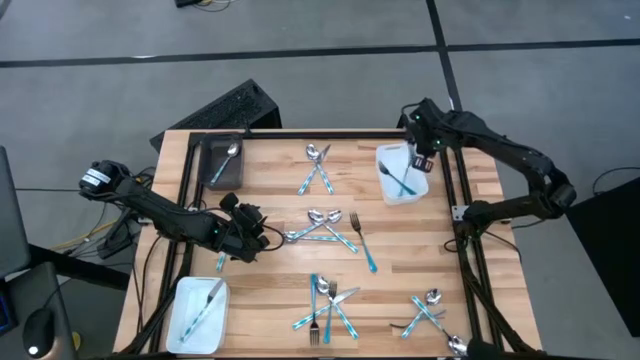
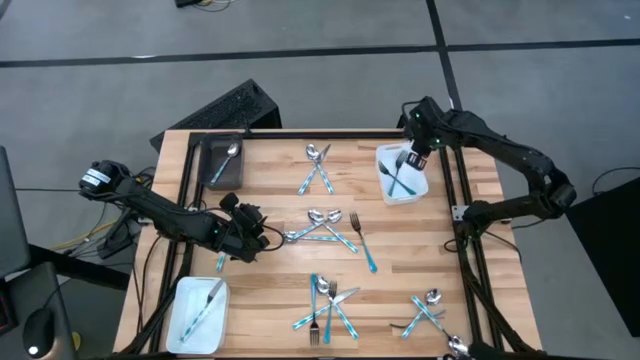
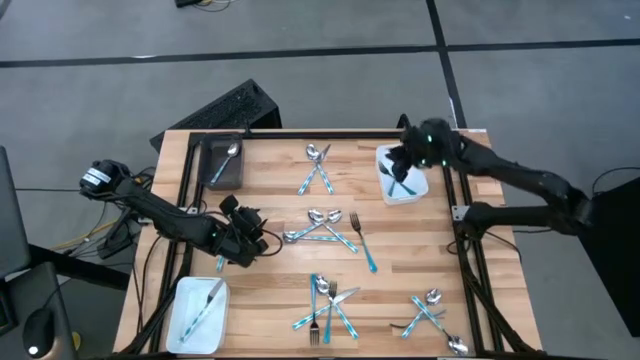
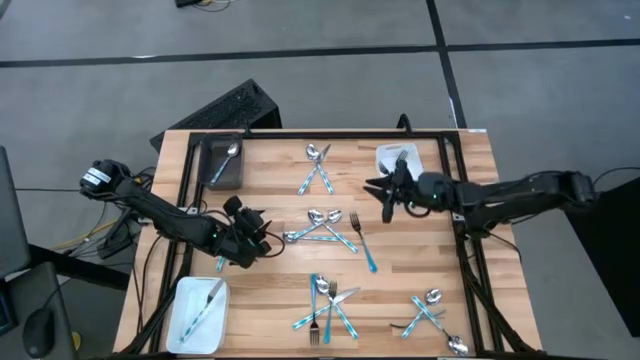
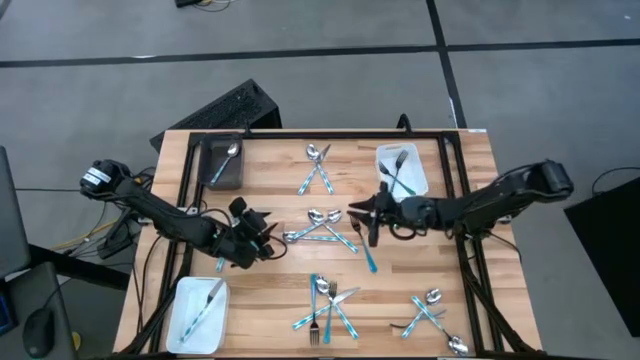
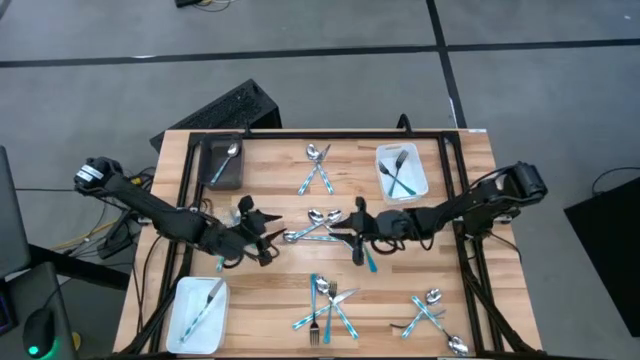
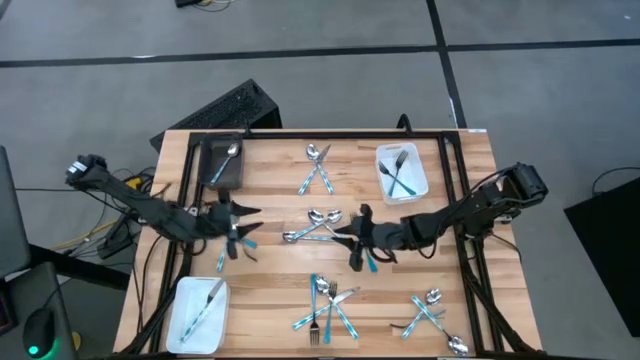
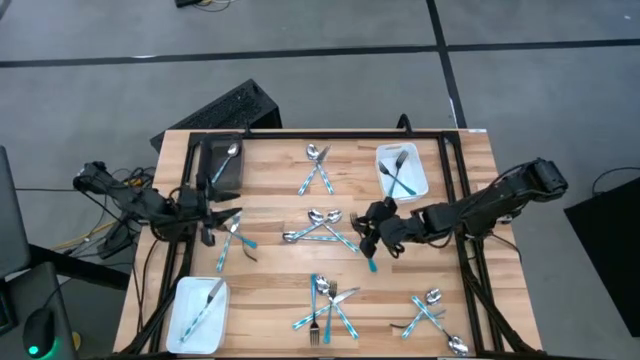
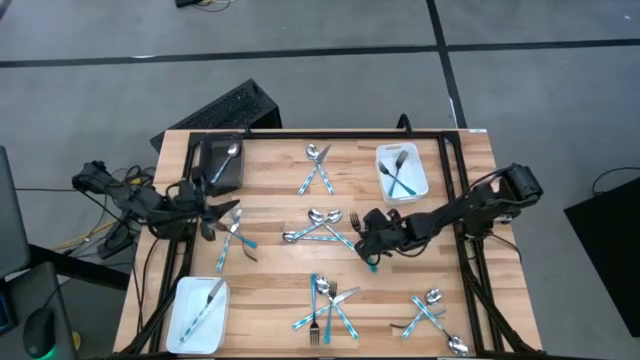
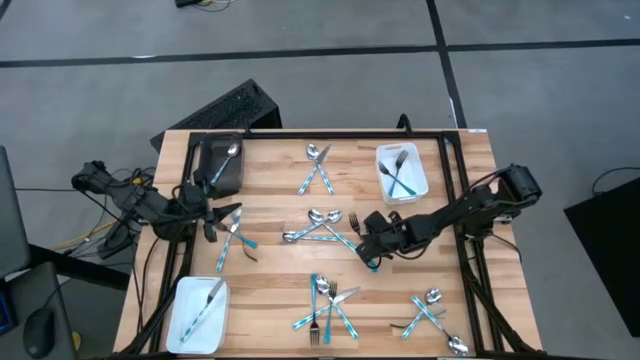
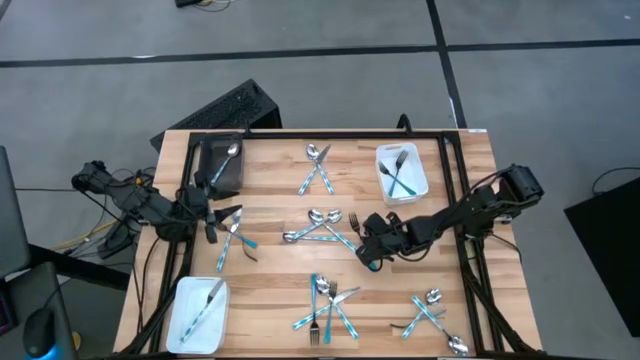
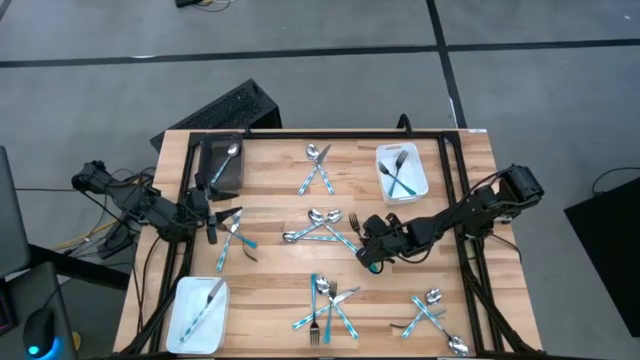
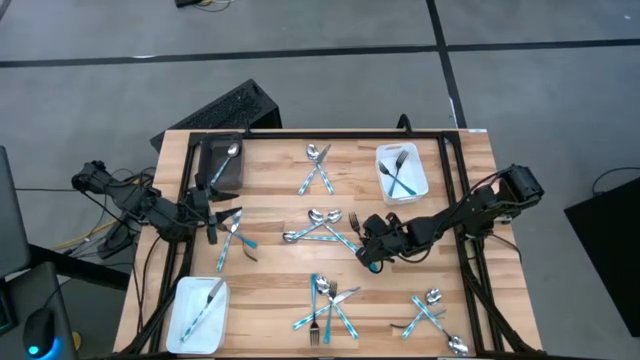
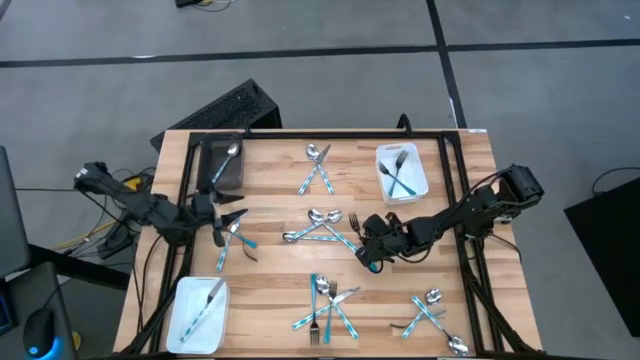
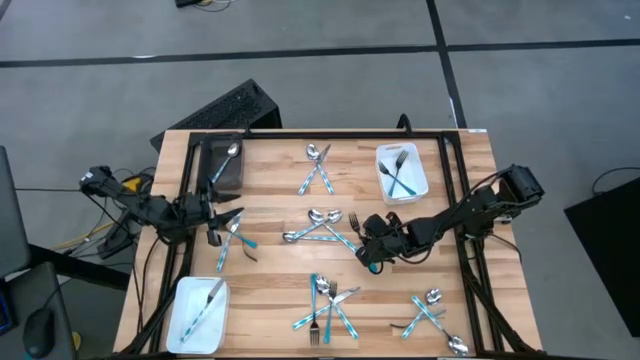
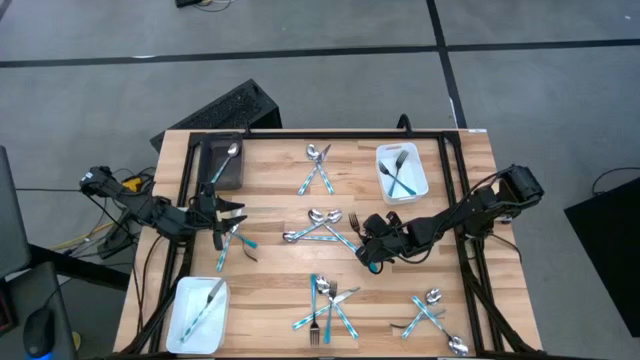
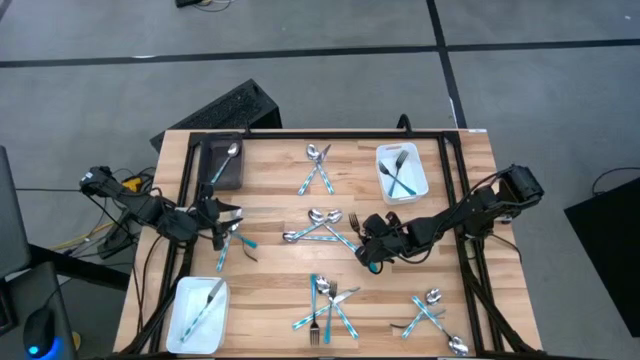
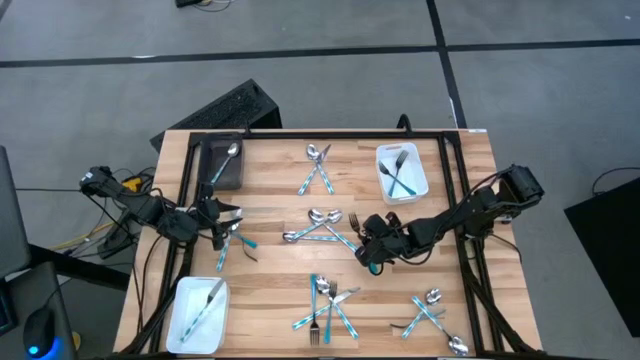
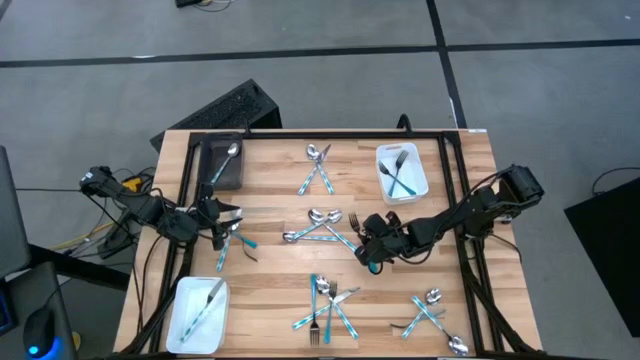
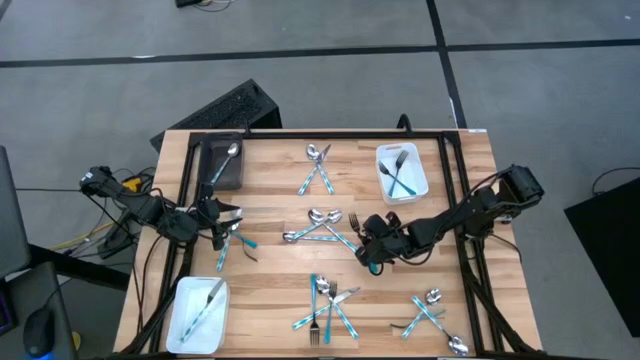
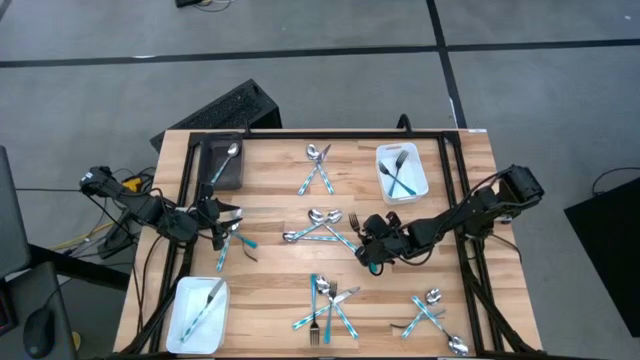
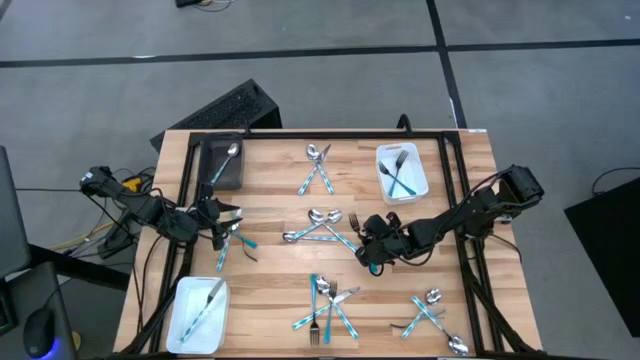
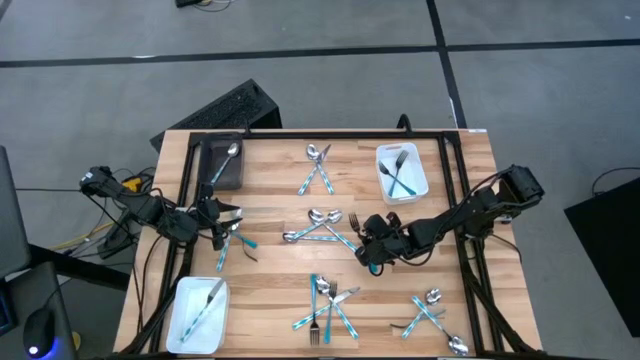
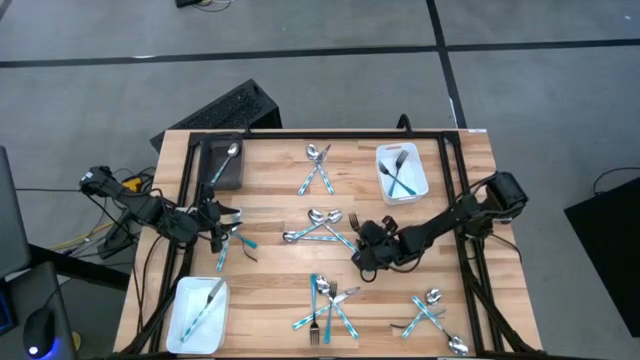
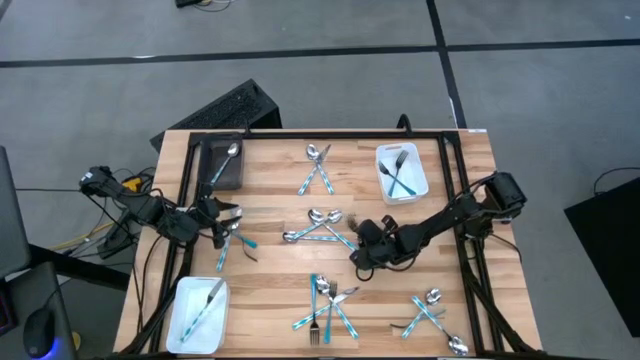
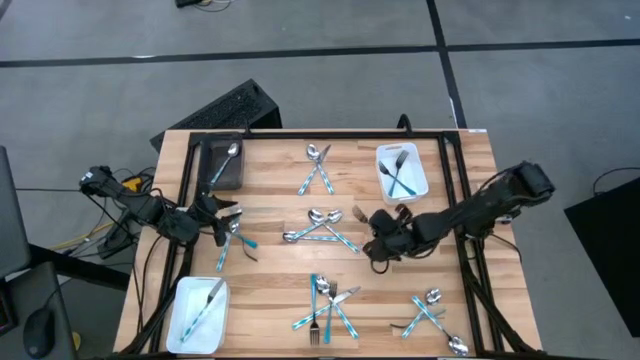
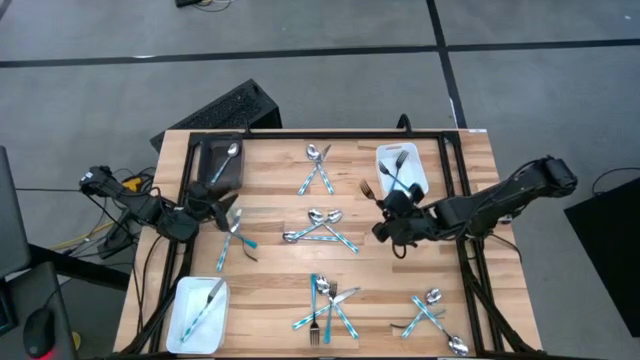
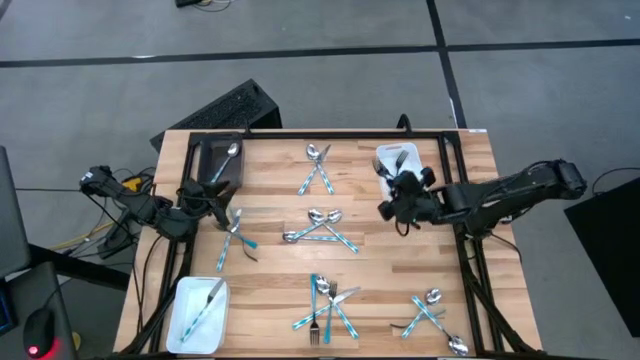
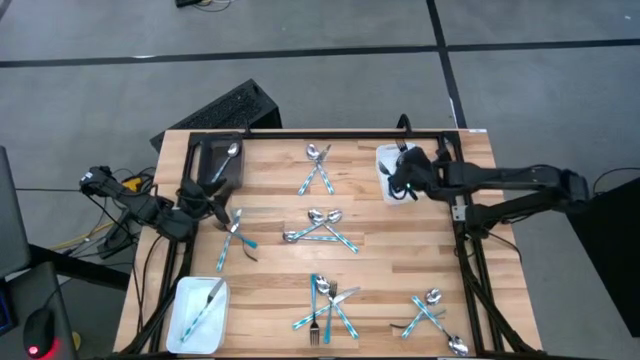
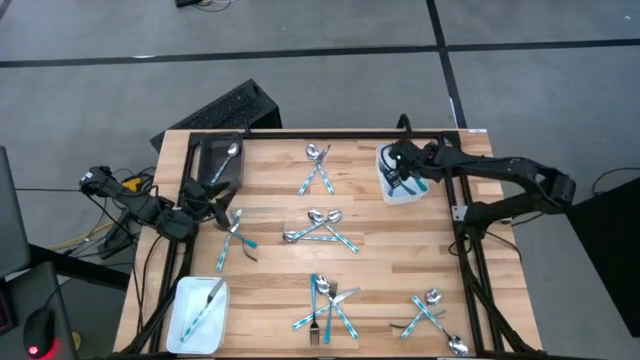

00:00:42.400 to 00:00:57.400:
Task: Sort silverware by color (type)
Put the blue fork into the top white bin

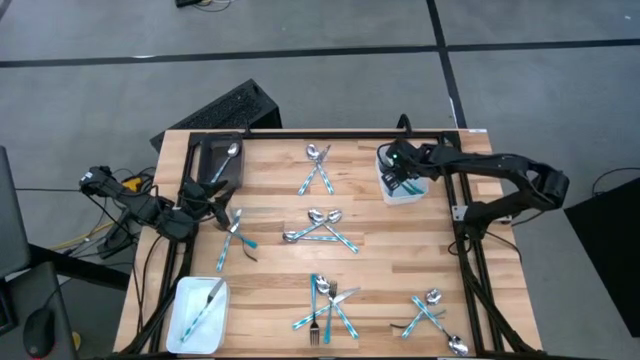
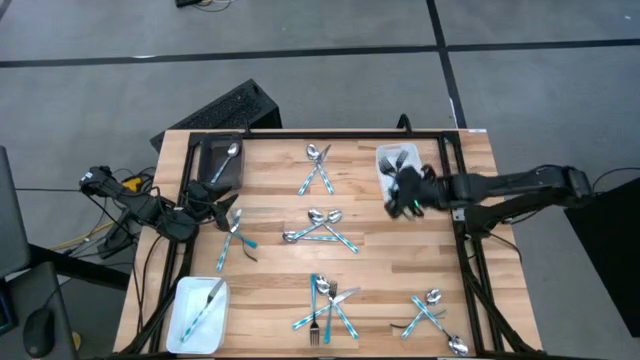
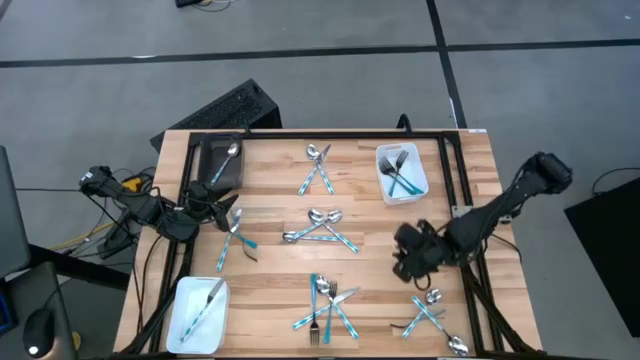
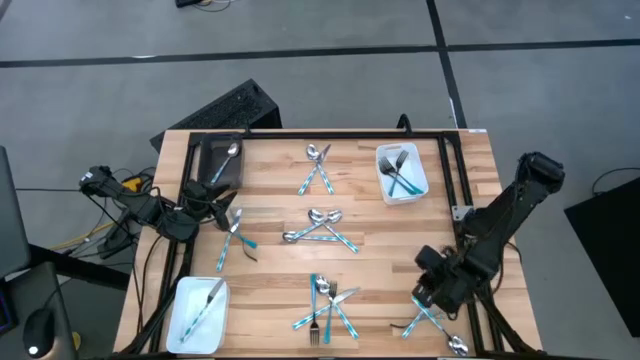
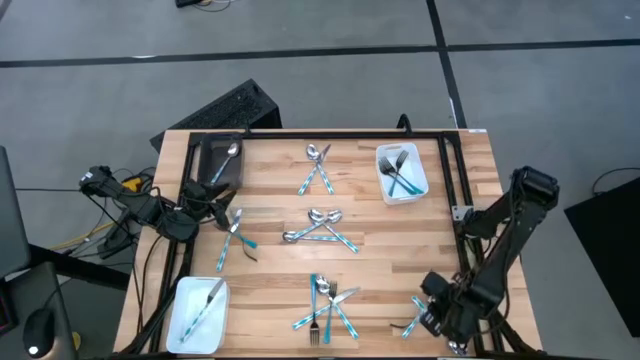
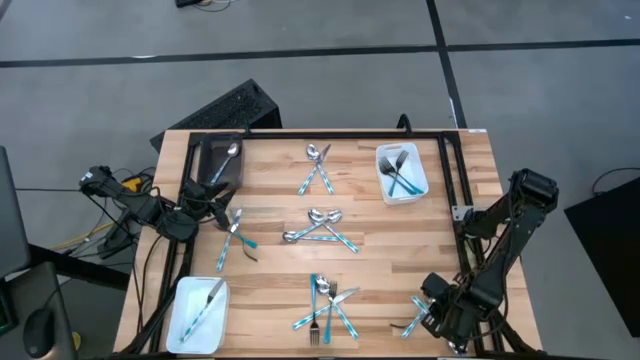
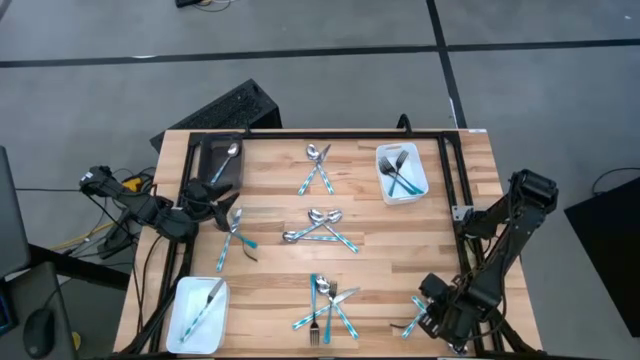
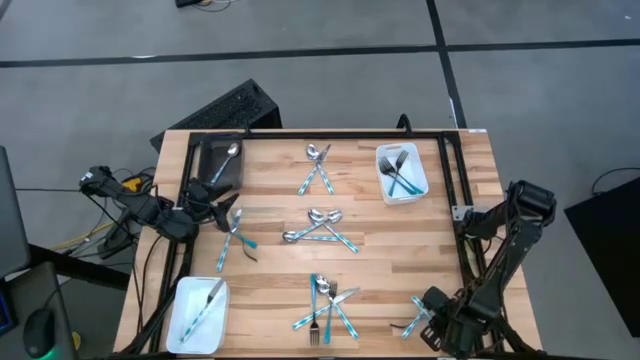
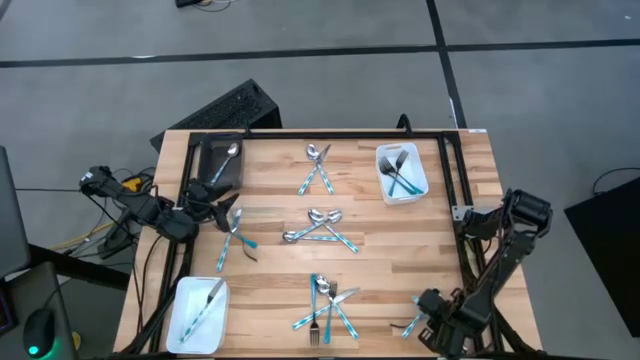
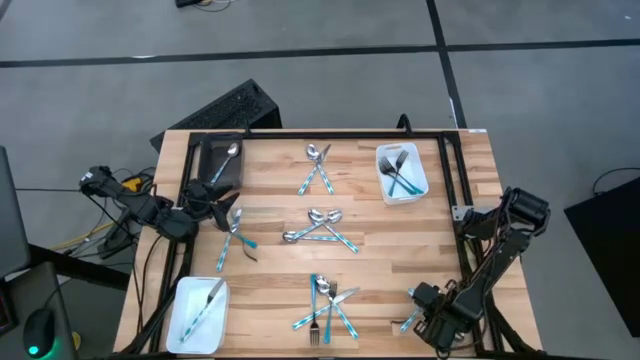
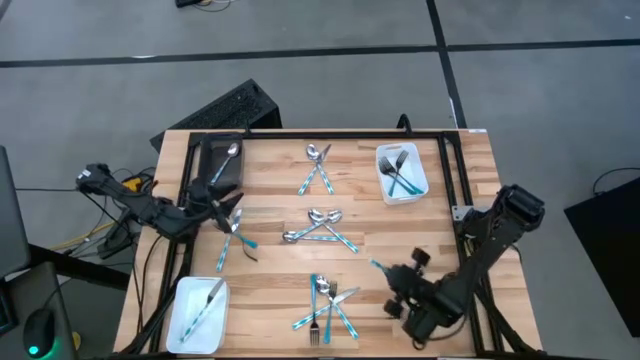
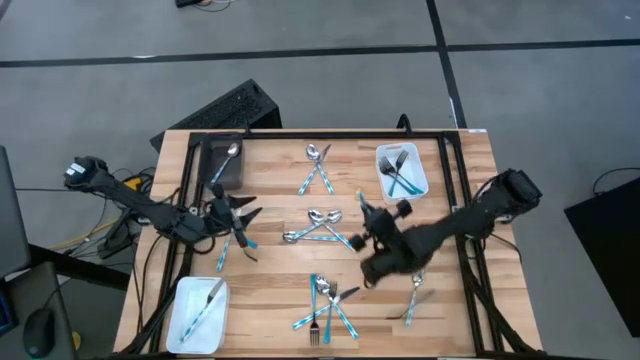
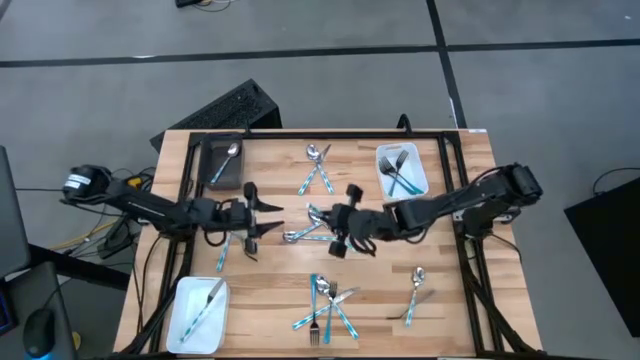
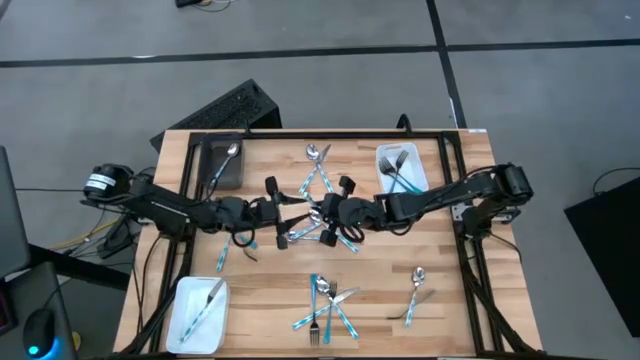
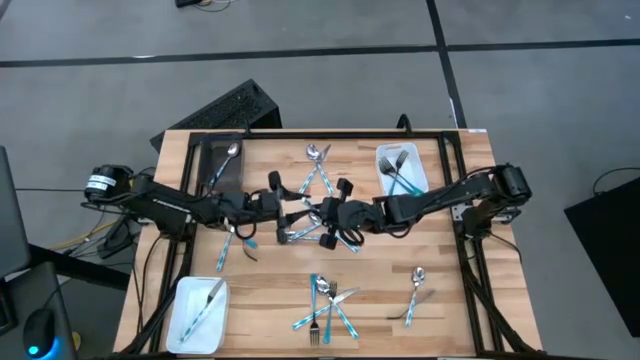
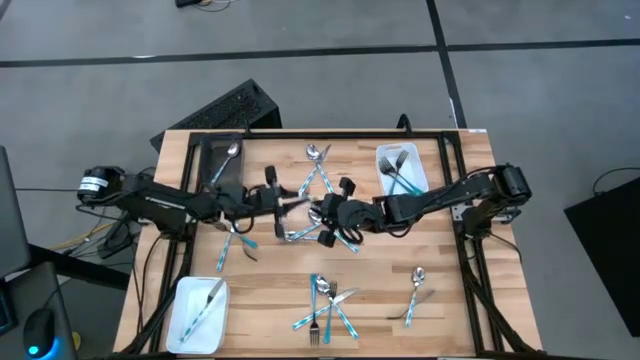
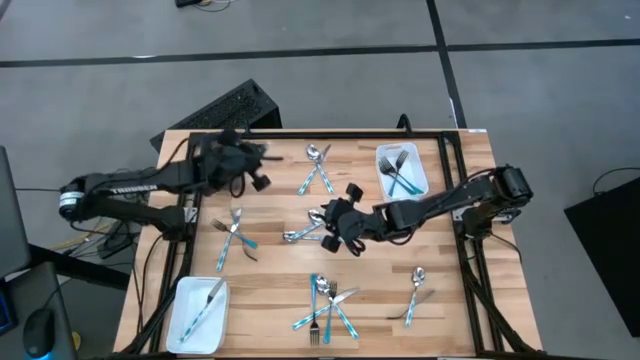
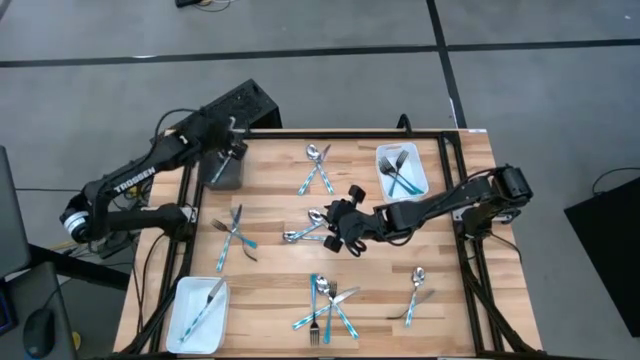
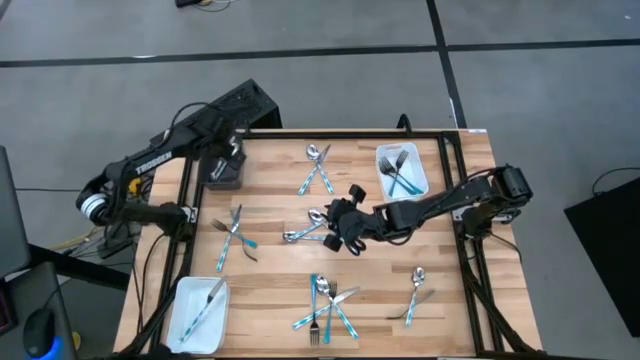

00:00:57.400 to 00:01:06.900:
Put the light blue spoon into the black bin
